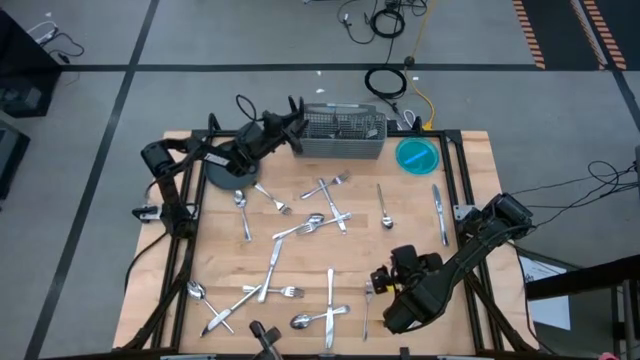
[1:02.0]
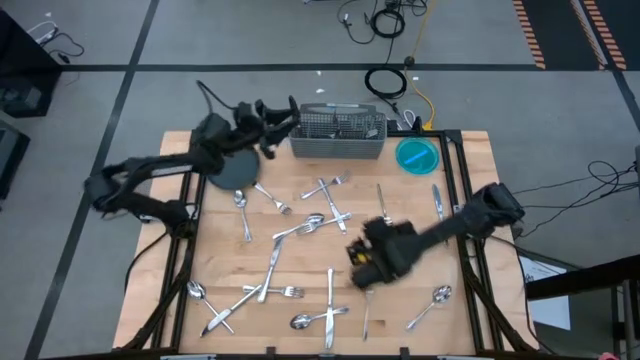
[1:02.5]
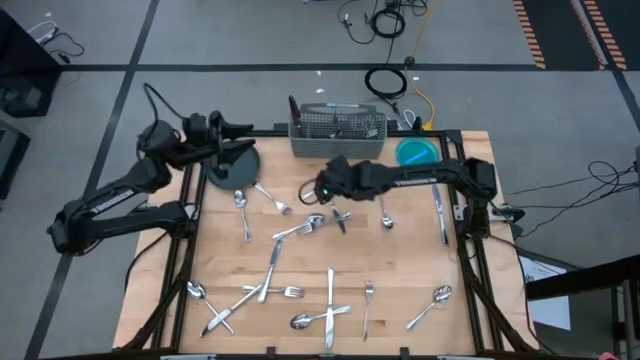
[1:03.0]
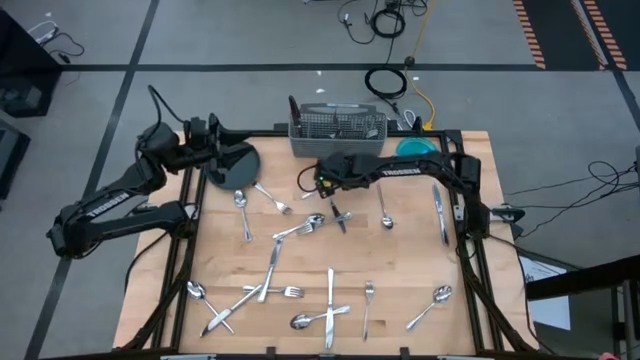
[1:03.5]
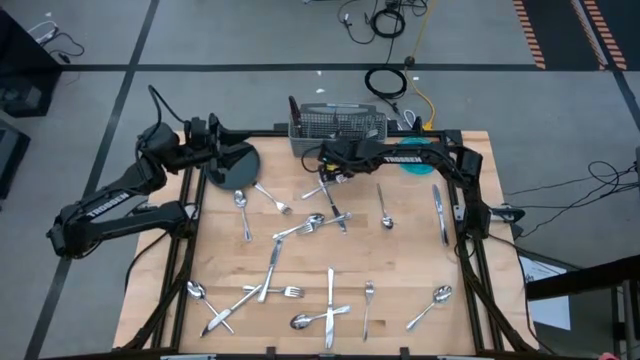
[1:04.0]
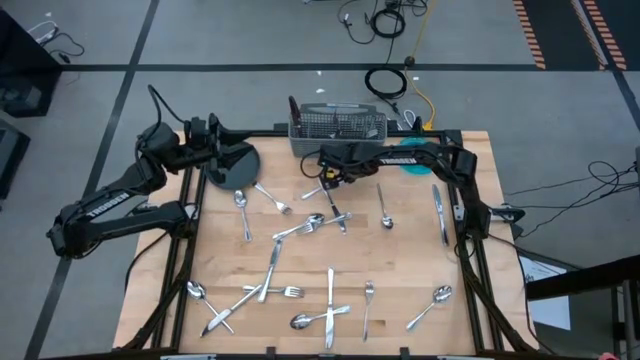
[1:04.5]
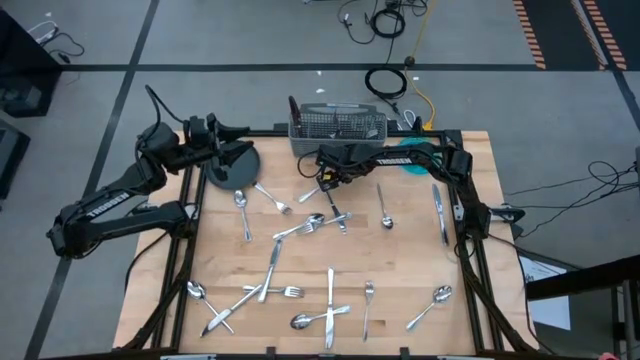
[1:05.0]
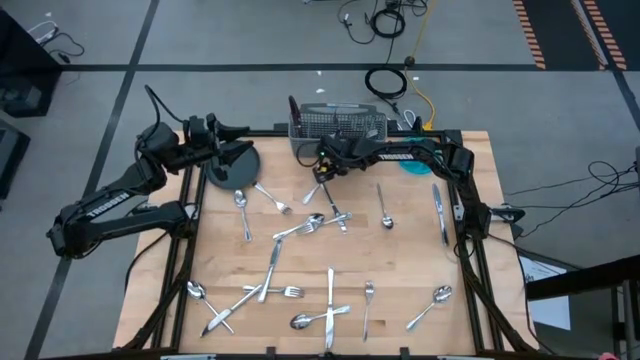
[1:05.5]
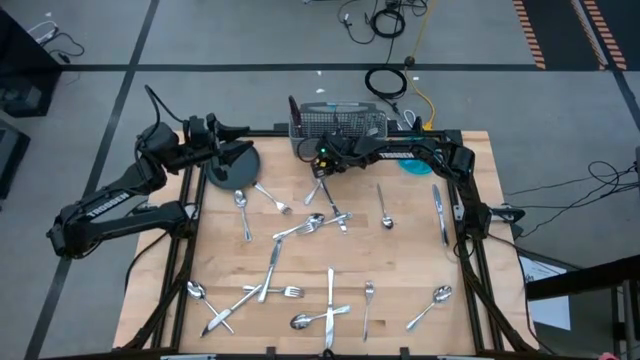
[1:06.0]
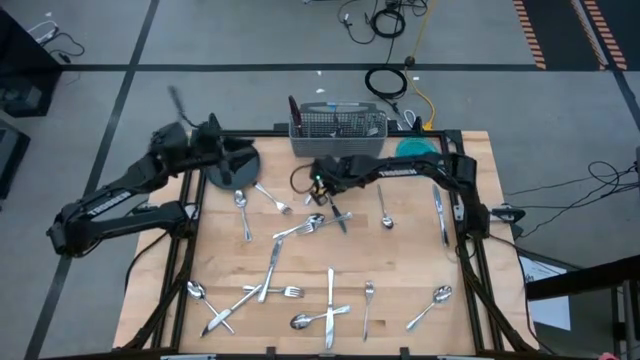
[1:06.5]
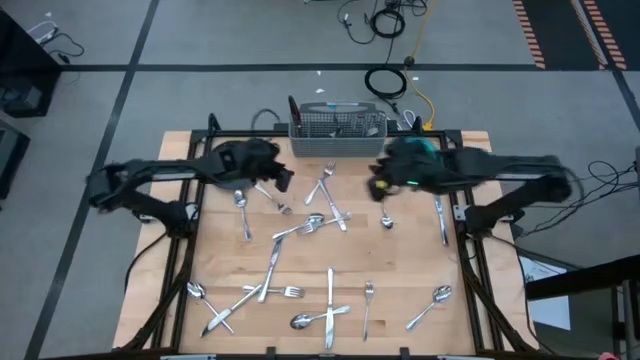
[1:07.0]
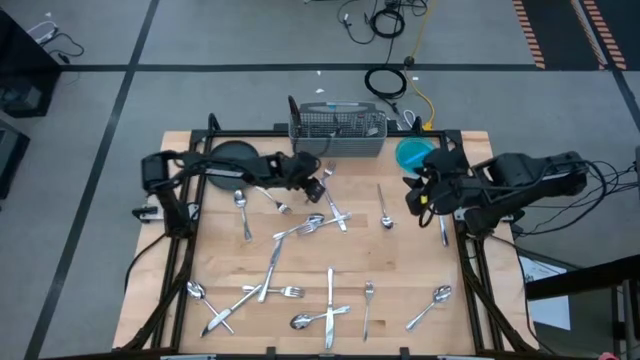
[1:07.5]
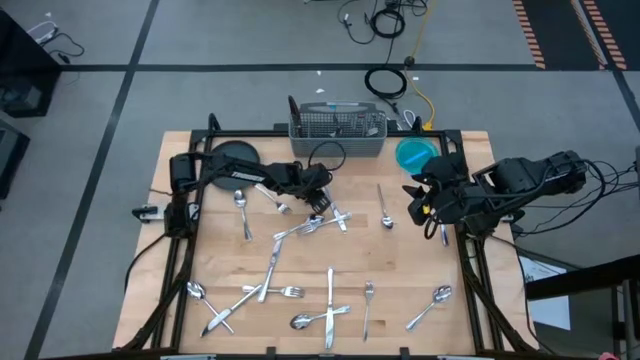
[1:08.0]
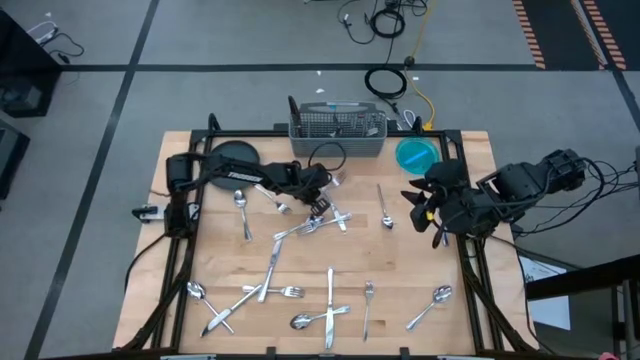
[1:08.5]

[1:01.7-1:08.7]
Task: Sort silverware
Put the fork into the silverware organizer

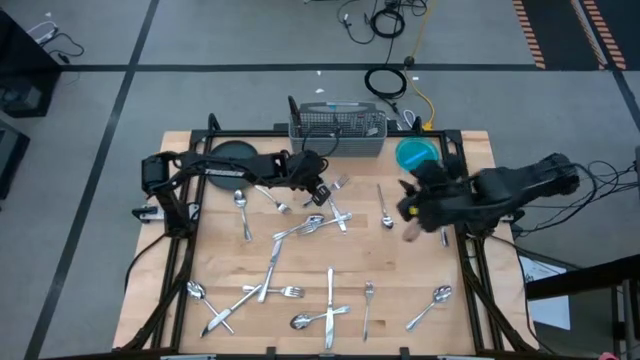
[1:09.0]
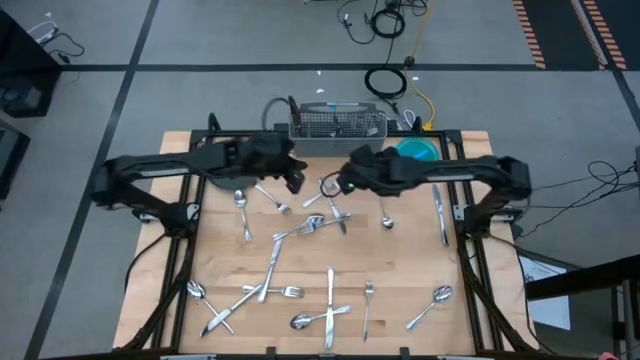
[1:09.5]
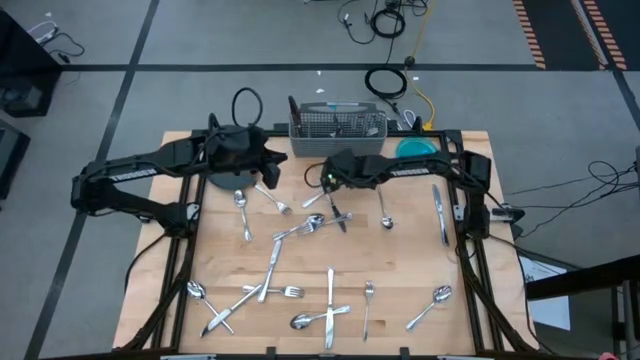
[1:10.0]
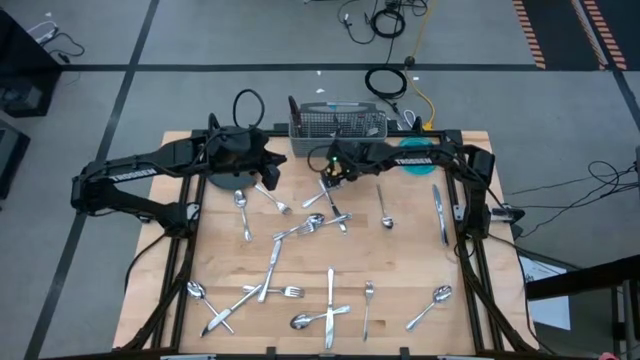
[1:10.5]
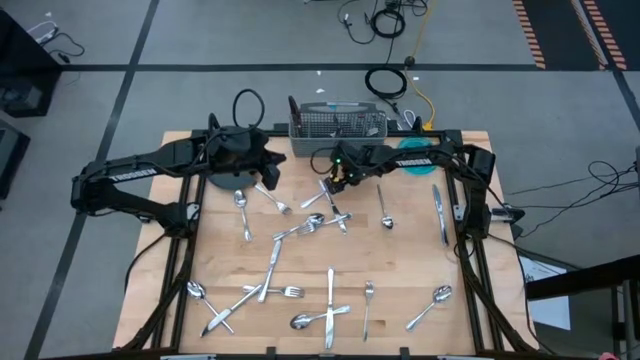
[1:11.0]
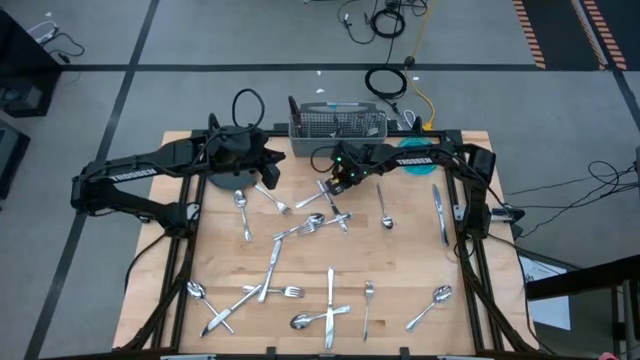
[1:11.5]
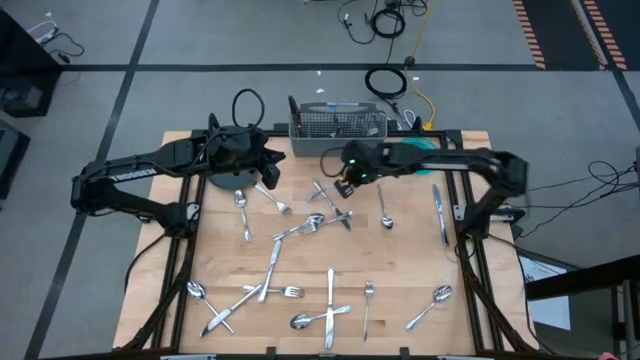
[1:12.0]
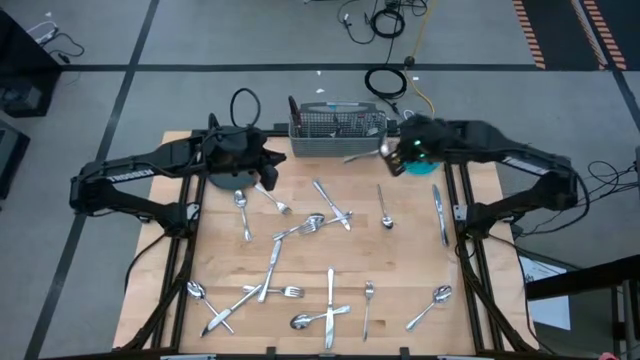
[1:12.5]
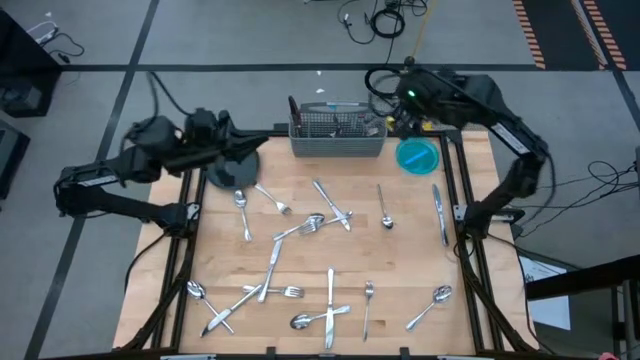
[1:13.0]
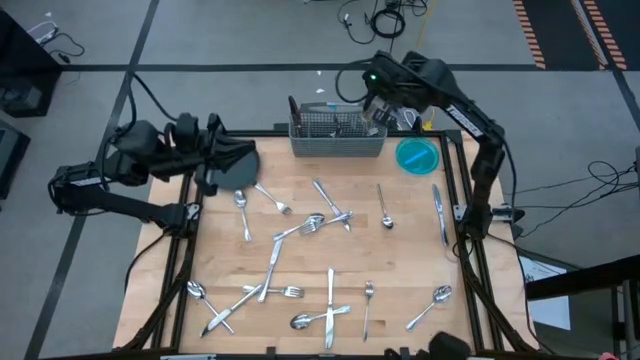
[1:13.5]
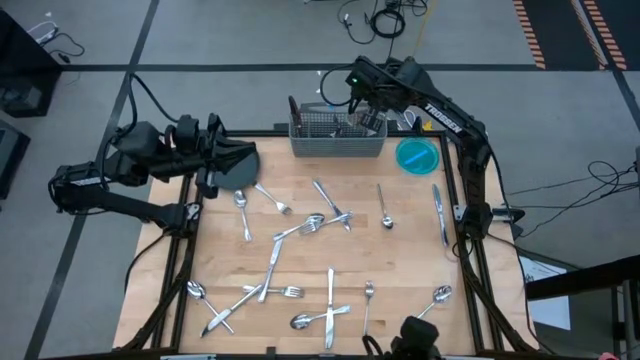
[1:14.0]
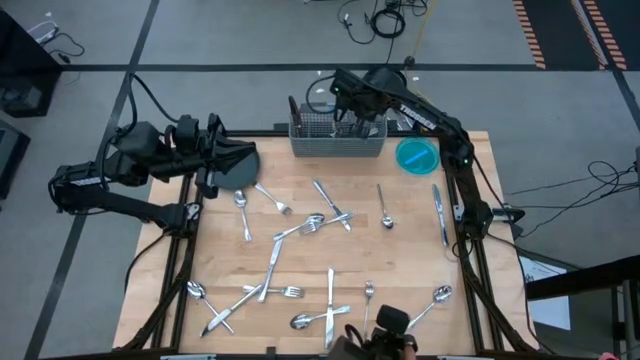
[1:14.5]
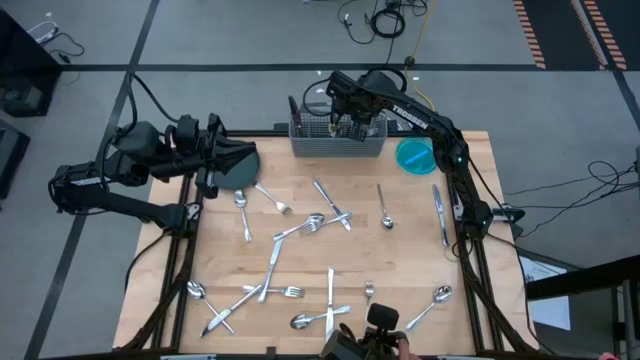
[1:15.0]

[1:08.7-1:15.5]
Put the fork into the silverware organizer

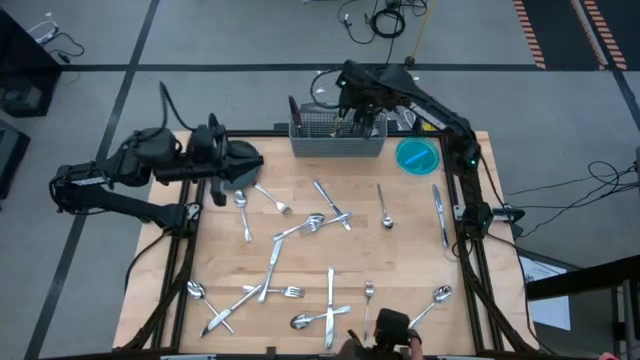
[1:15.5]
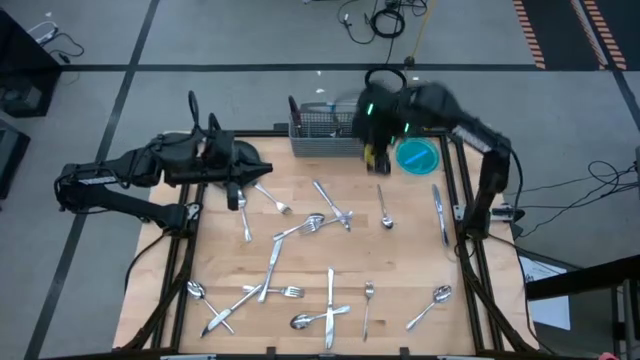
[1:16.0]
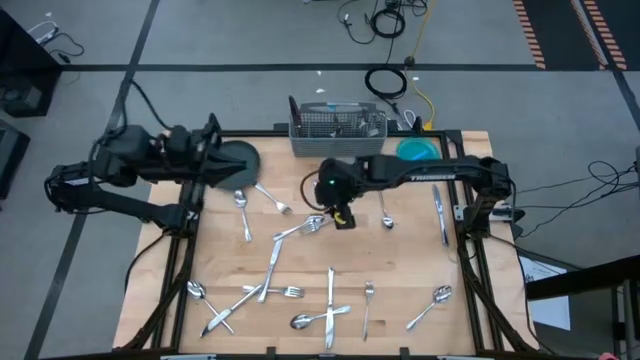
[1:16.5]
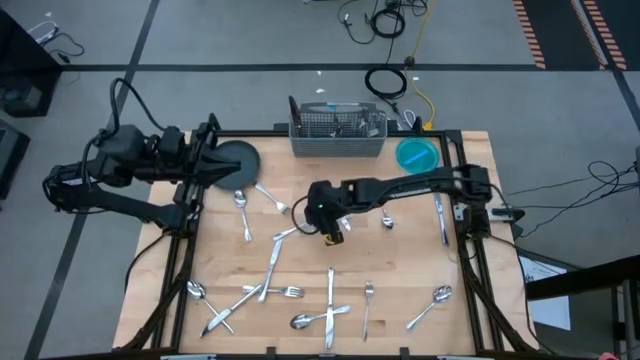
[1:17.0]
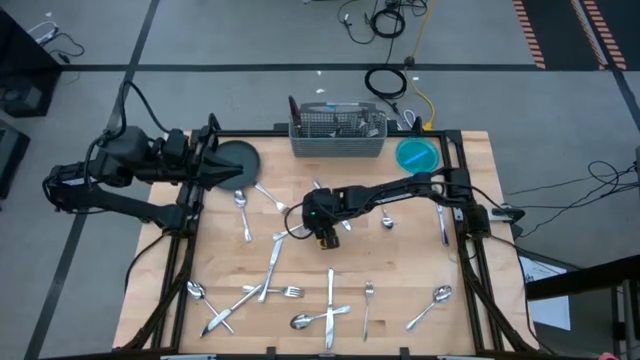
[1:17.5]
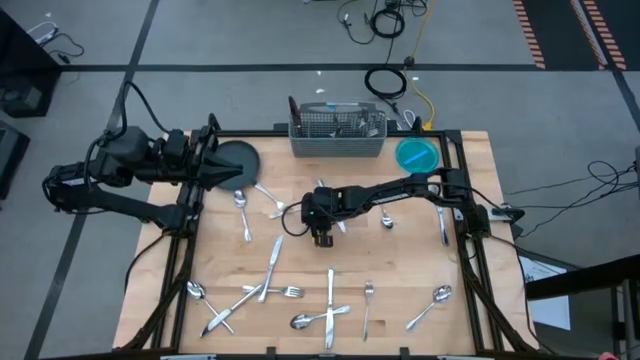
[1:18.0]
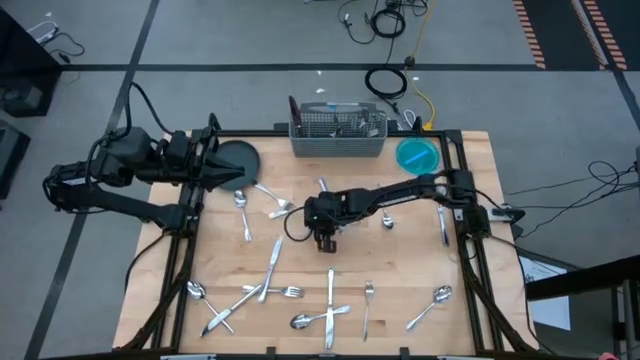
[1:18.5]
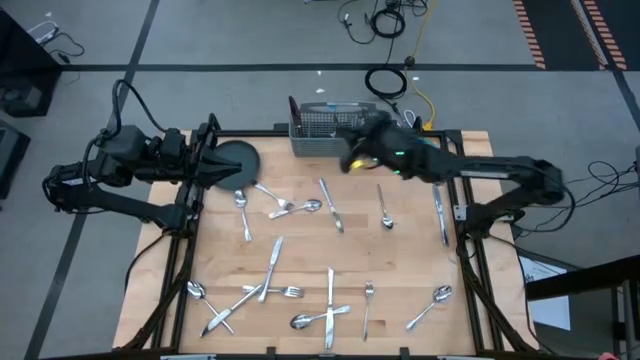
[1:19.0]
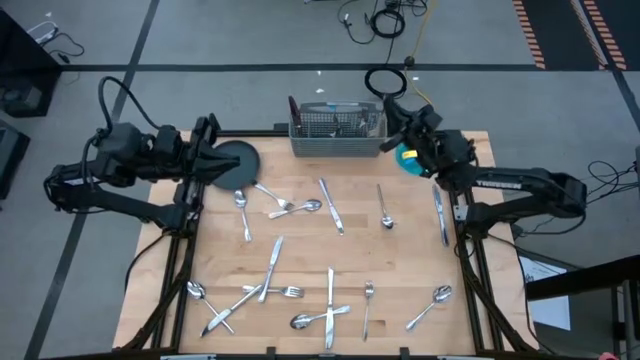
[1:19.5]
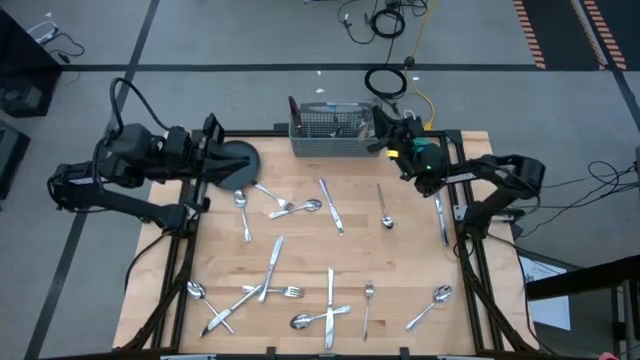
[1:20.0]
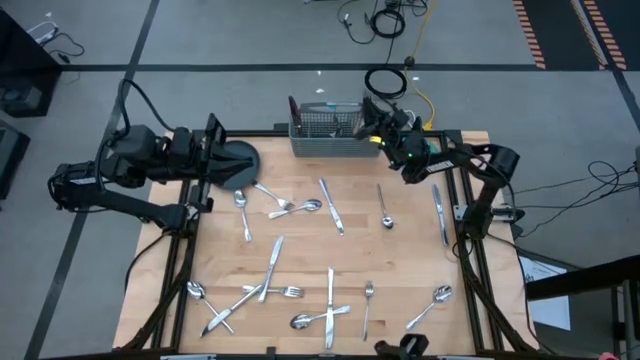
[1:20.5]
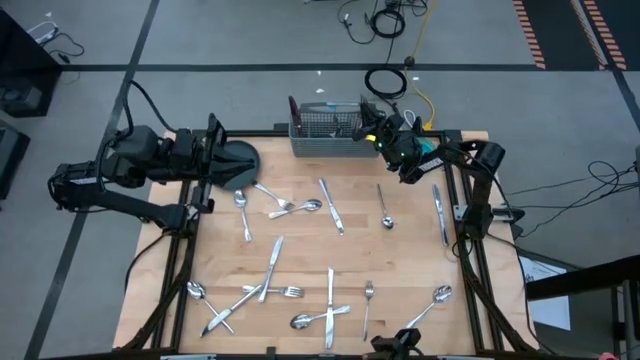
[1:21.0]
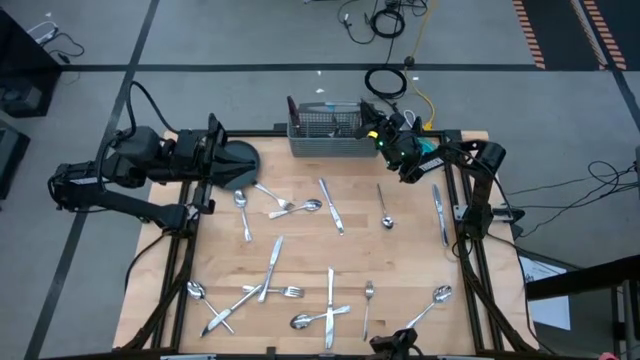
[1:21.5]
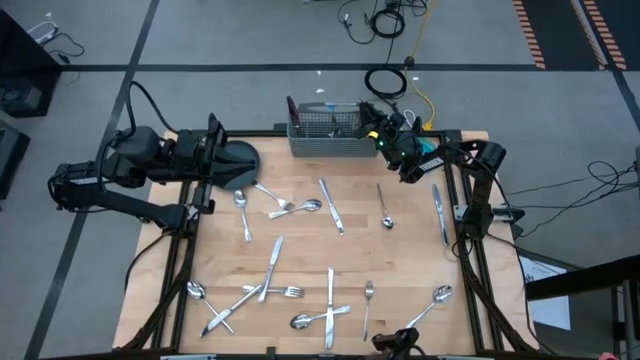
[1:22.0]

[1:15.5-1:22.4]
Put the fork into the silverware organizer
